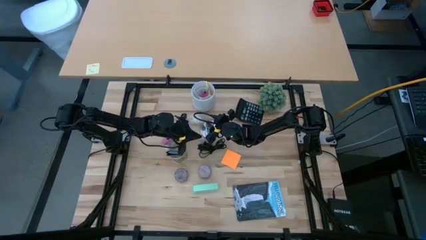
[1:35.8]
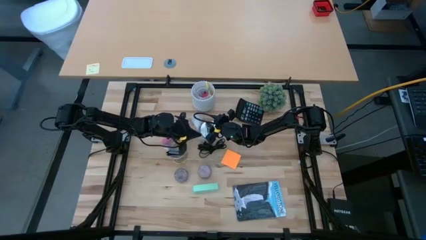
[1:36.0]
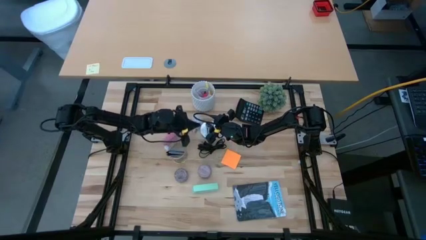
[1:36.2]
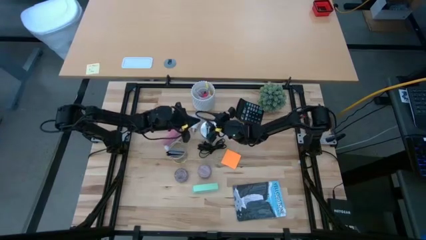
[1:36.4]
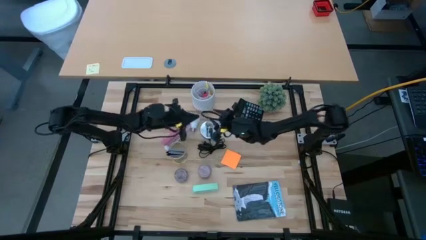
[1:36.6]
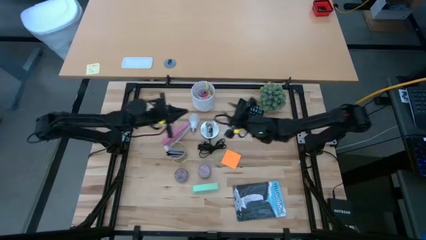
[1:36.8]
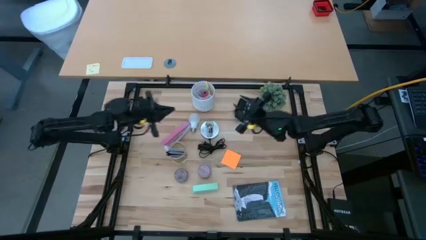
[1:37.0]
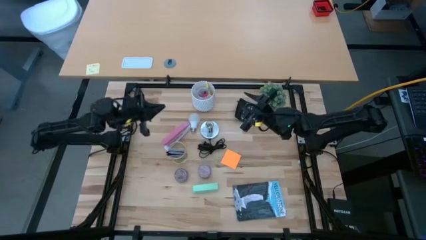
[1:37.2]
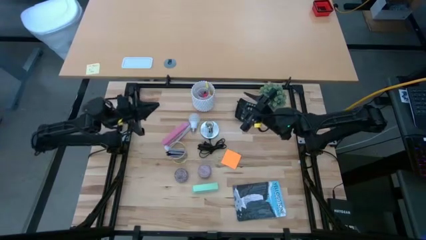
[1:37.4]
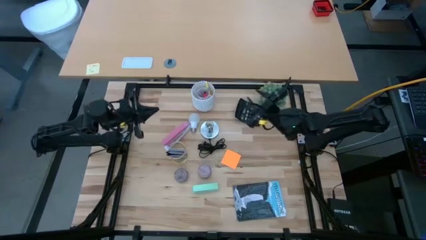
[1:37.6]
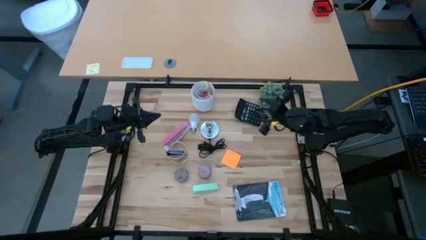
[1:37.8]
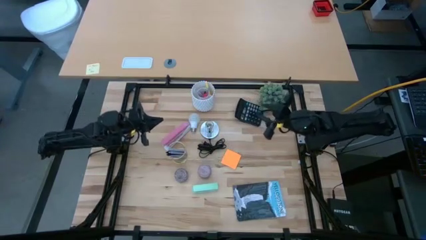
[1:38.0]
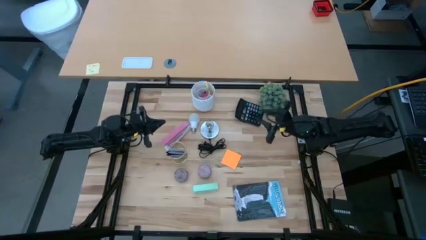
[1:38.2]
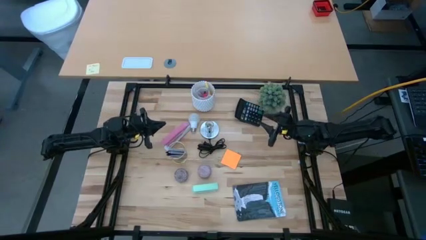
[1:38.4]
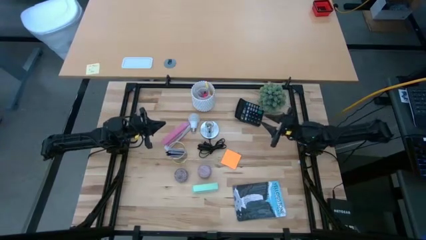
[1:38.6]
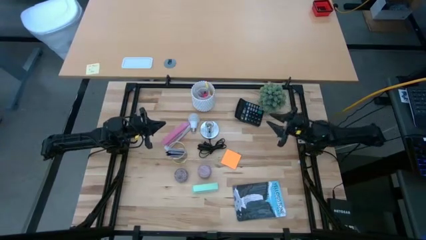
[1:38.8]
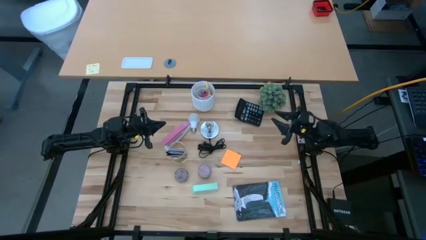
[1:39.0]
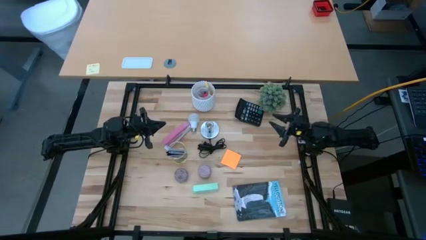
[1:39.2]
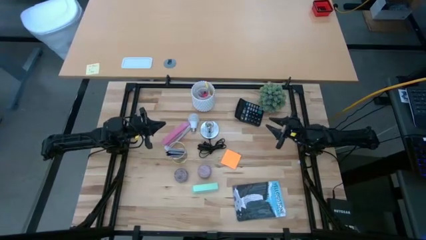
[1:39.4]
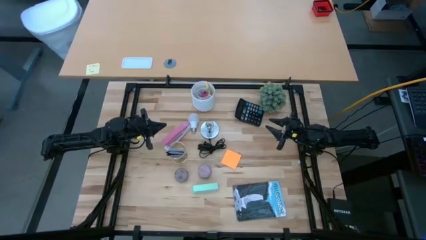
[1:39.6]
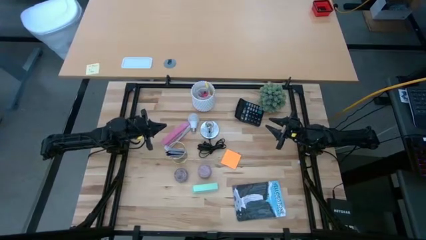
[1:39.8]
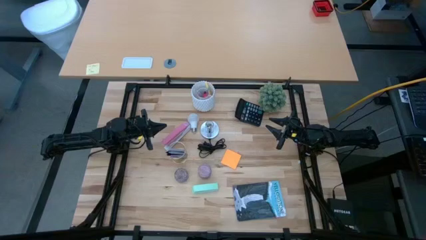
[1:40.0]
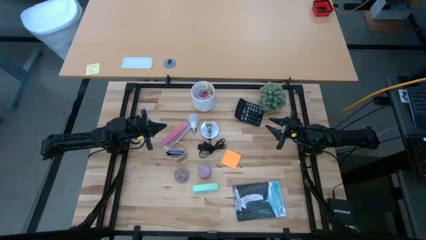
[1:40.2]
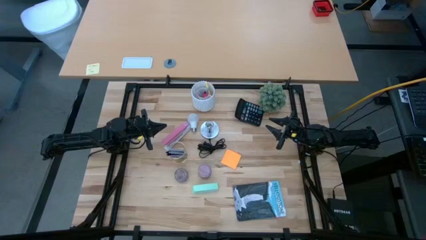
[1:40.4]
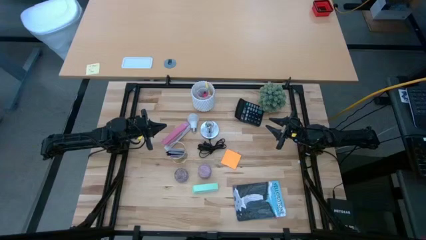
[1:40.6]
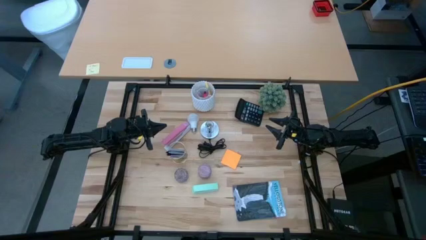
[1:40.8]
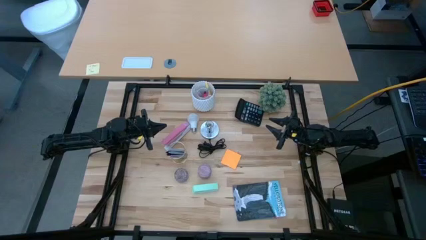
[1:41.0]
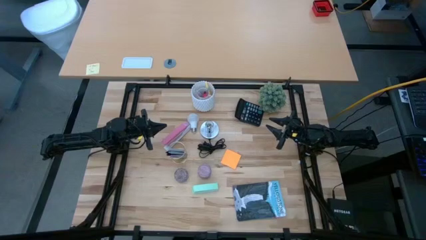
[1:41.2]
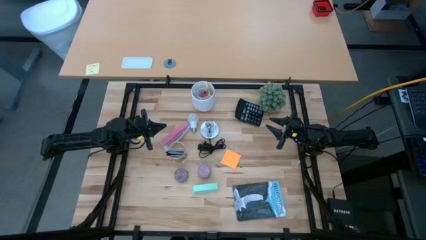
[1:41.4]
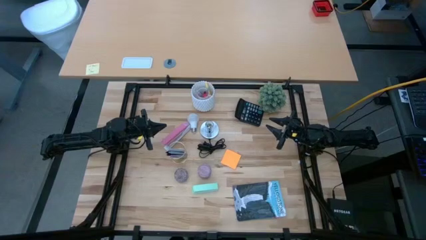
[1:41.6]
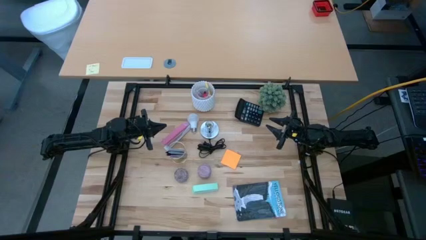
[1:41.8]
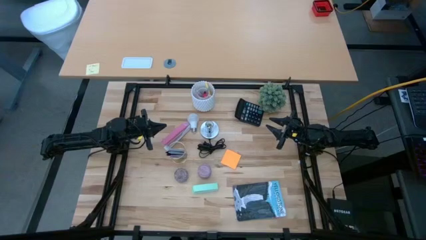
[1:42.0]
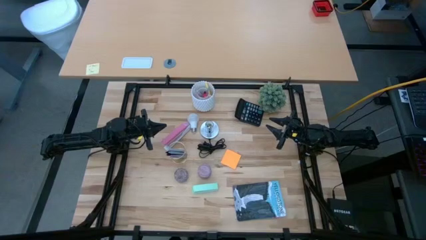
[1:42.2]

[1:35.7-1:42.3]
Task: Screw lightbulb
Return To Home Position

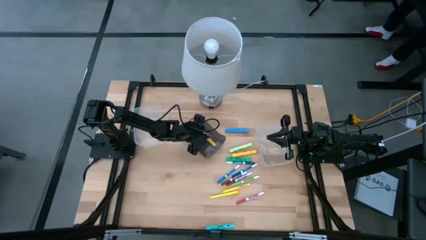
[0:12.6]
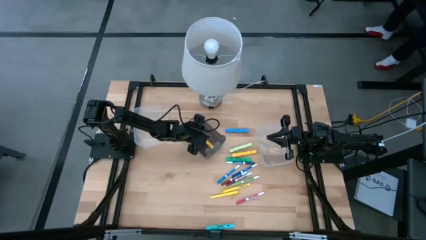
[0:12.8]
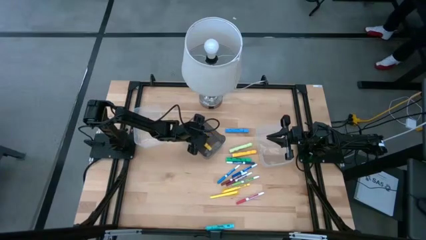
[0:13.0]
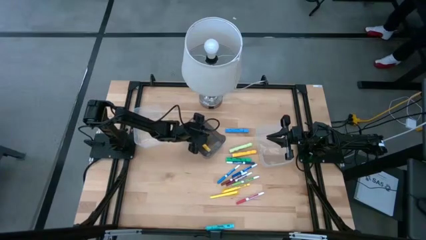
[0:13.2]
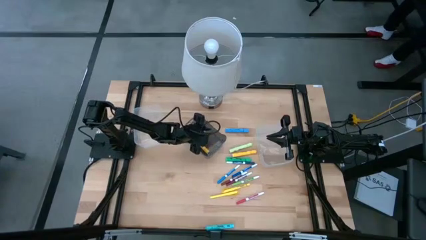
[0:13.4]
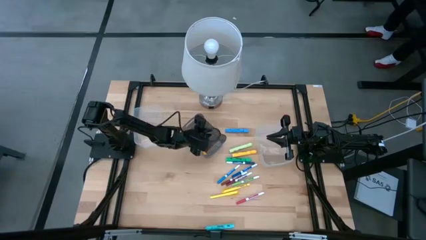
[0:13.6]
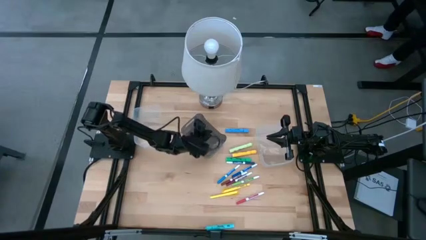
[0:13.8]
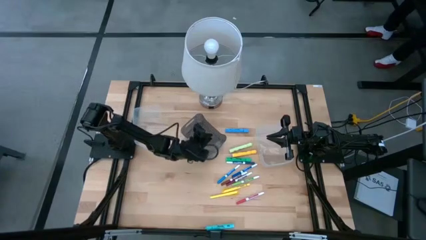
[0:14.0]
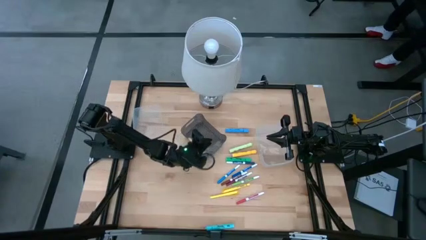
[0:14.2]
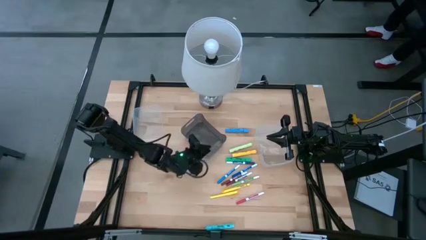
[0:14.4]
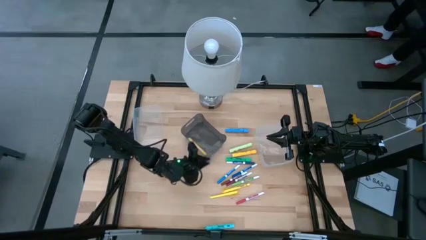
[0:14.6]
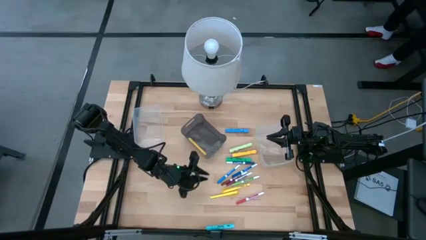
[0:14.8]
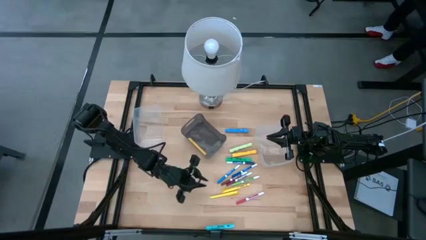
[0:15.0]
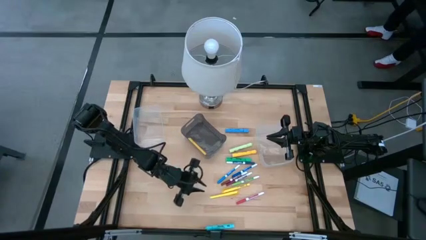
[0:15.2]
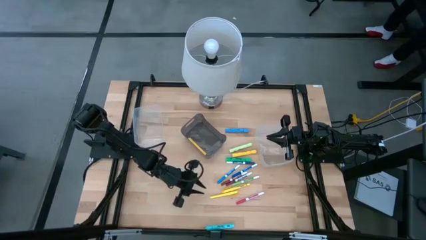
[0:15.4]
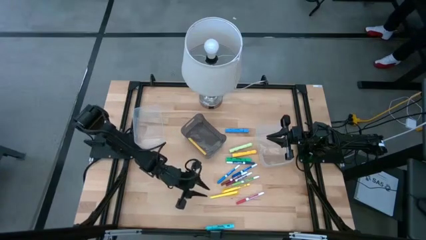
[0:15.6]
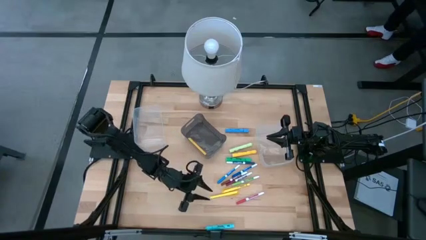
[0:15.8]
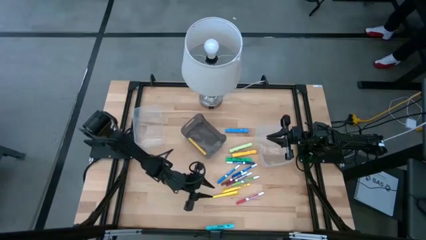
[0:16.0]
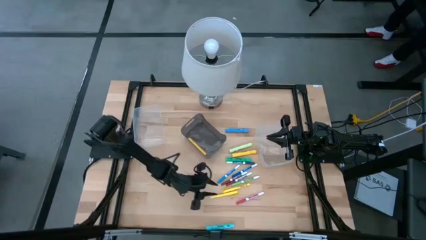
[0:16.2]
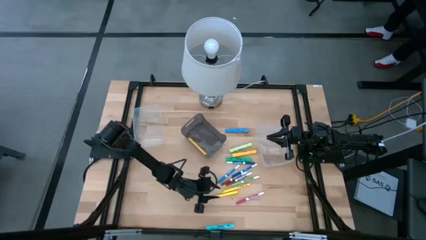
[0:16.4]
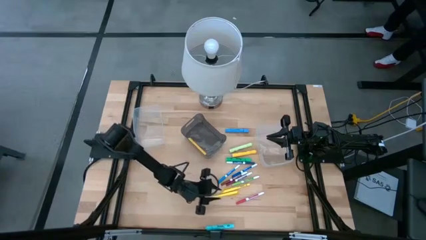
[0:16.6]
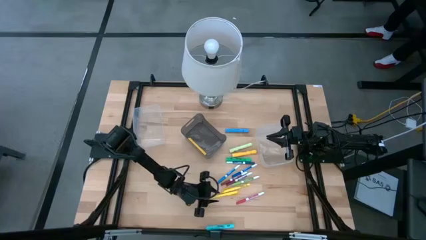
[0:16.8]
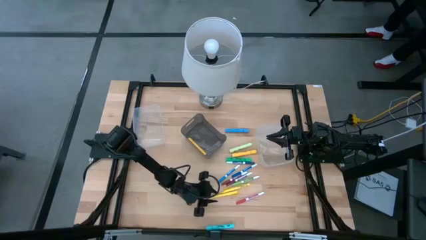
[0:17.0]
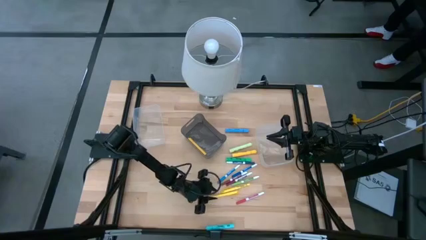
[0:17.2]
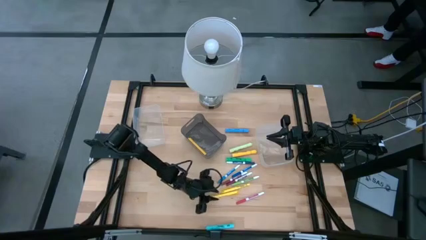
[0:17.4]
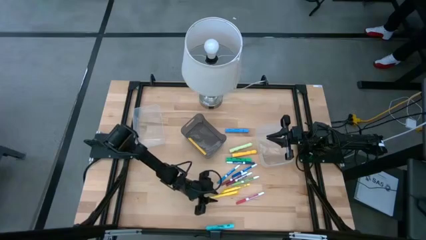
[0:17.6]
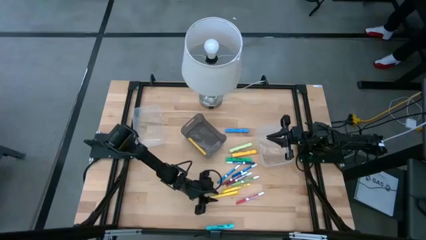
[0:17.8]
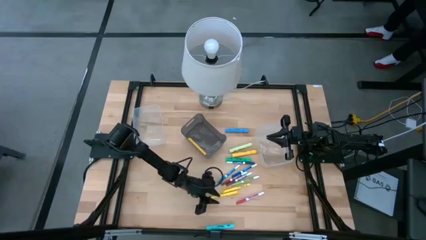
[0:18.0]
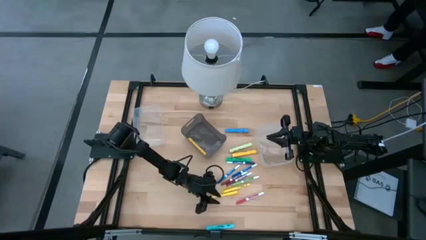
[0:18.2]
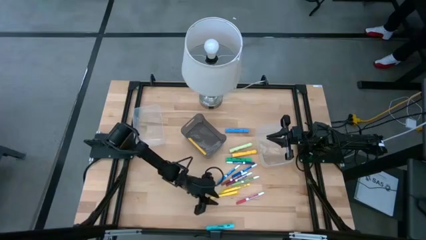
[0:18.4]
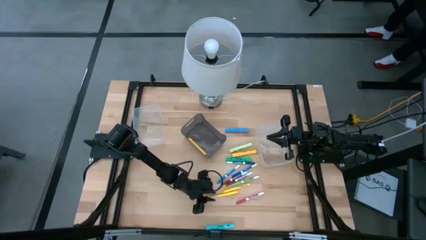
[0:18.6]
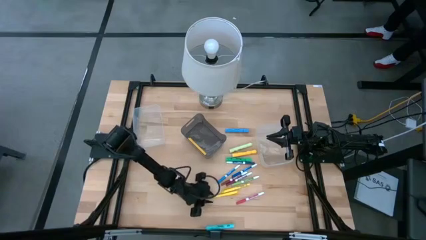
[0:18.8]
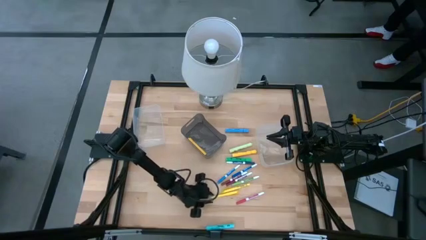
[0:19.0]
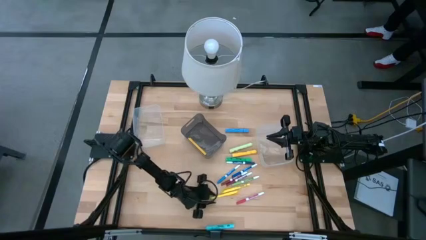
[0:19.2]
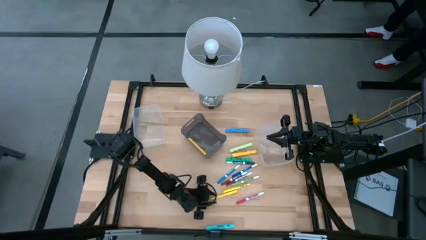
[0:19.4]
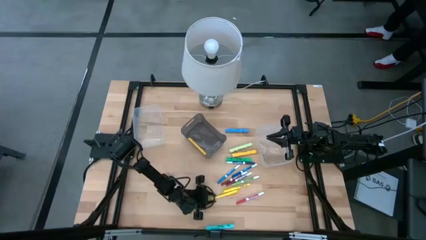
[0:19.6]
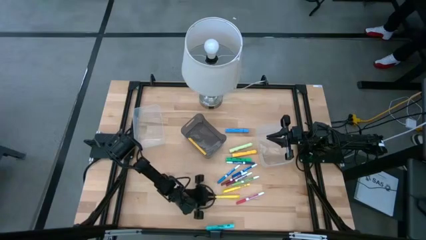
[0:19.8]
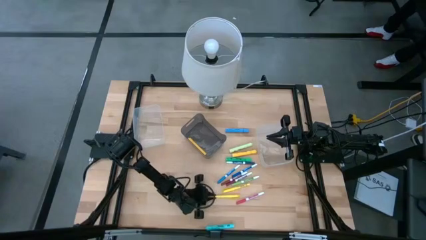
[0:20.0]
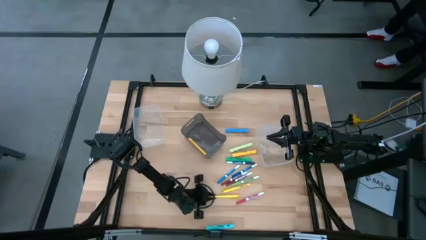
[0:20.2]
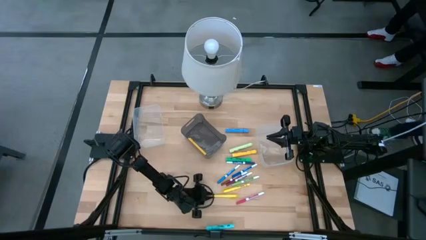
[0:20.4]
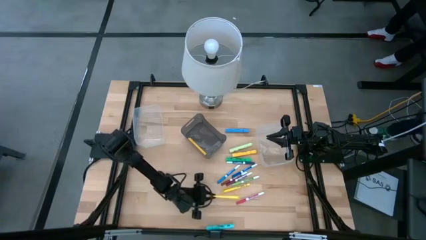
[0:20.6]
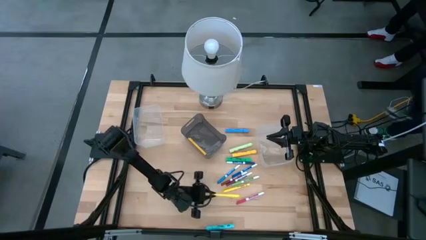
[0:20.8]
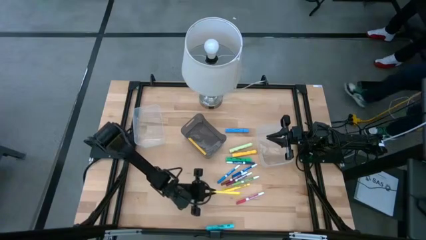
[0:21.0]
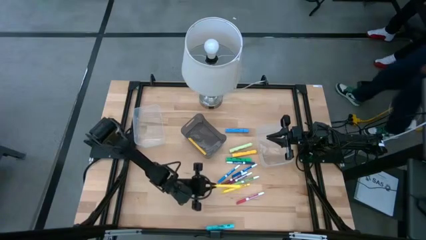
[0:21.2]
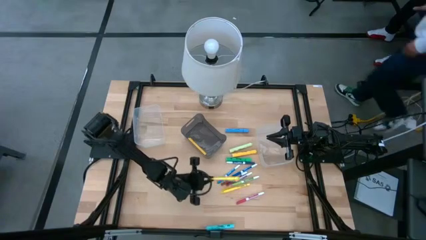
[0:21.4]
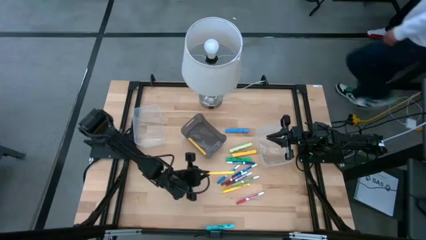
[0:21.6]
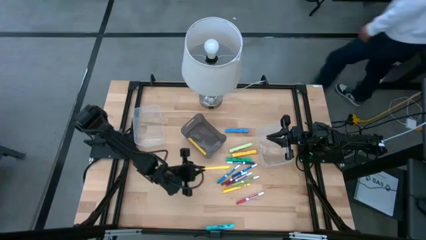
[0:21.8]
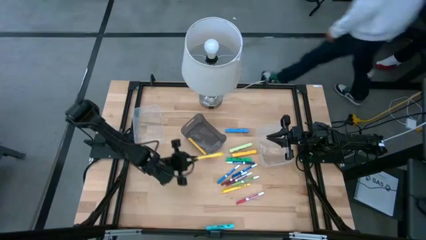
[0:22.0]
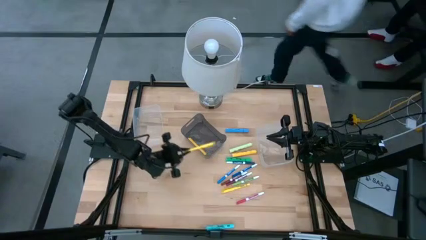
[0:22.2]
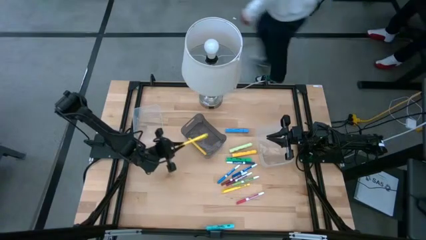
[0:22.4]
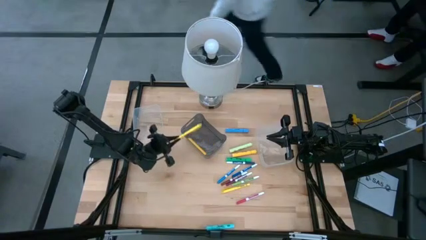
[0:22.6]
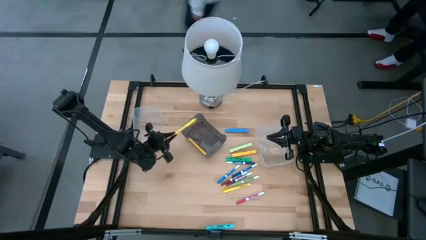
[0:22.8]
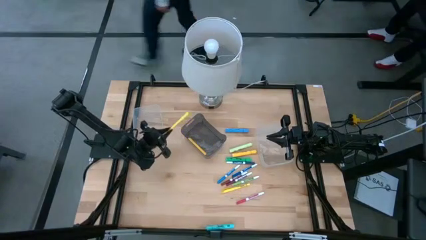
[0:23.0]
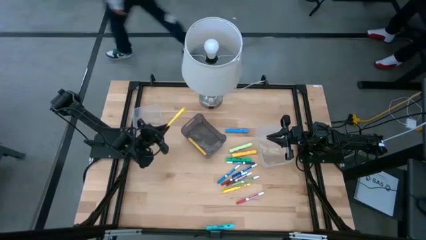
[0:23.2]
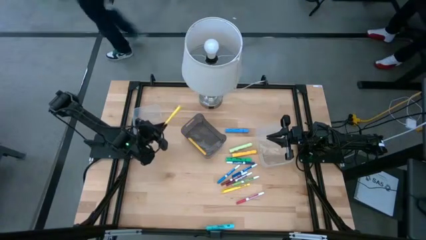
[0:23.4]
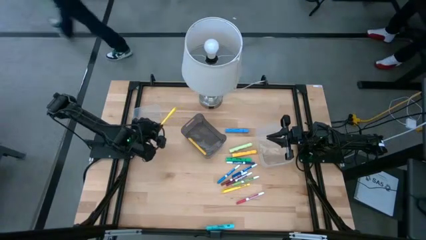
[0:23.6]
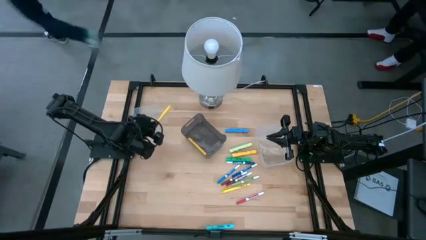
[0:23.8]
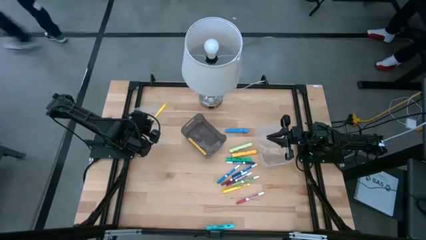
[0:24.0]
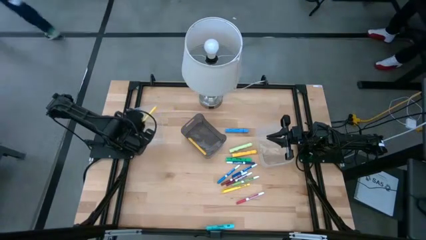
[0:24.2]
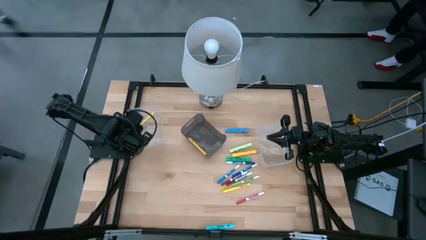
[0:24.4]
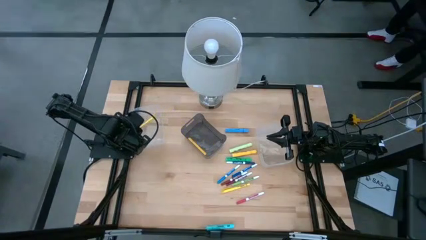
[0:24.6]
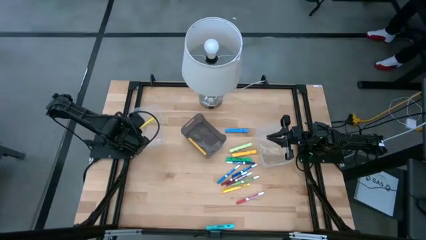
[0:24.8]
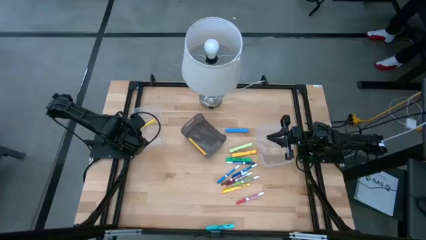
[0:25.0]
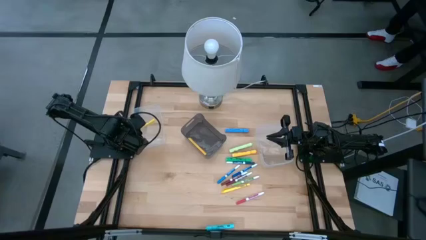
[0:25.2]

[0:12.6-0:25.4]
Task: Pick & Place Markers
Put the bottom yellow pen into the left transparent bin
